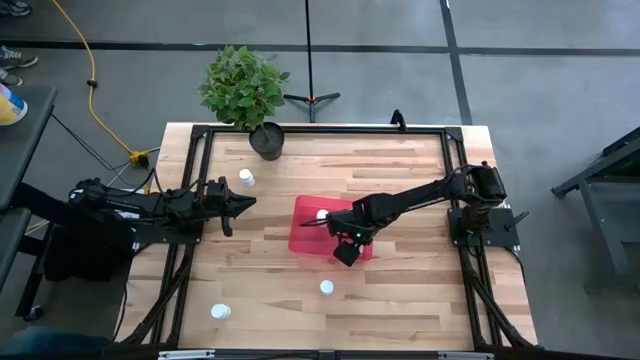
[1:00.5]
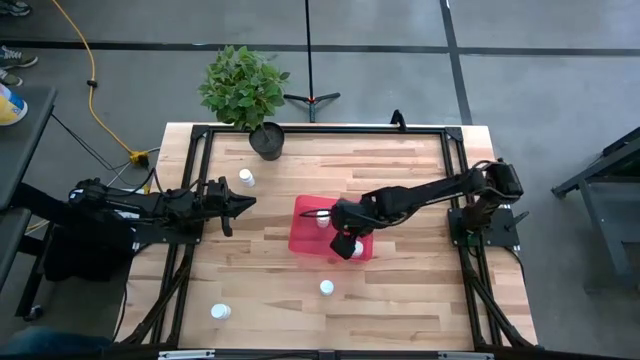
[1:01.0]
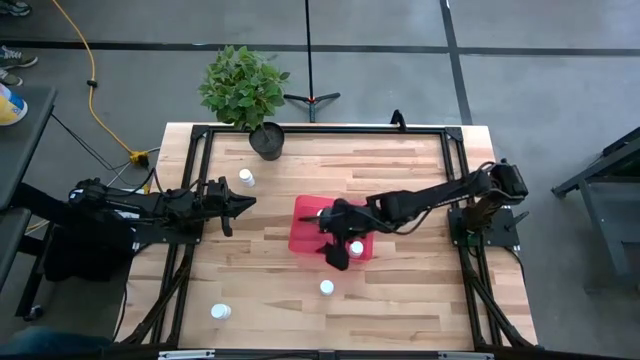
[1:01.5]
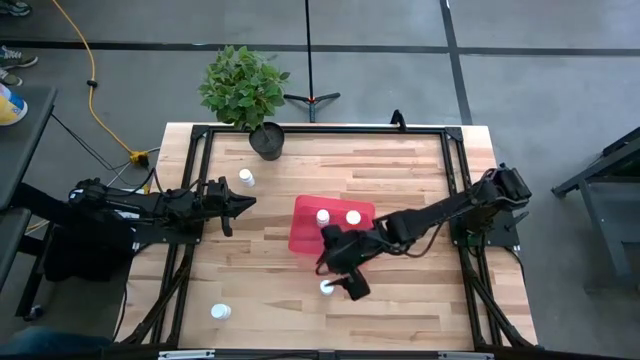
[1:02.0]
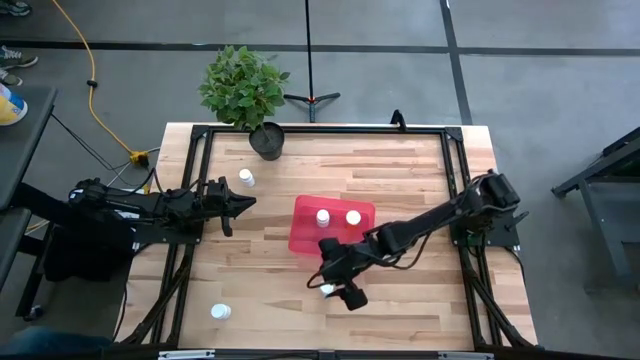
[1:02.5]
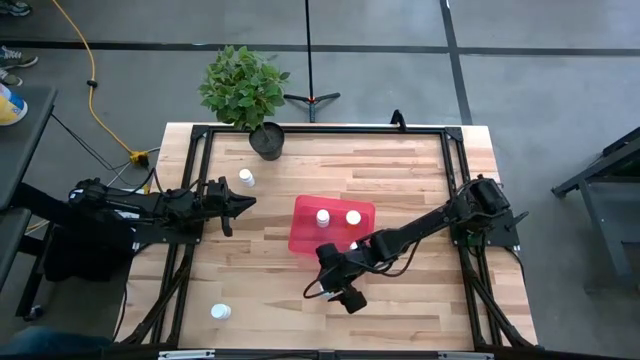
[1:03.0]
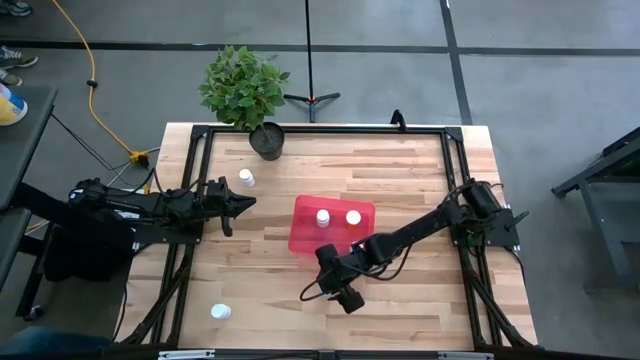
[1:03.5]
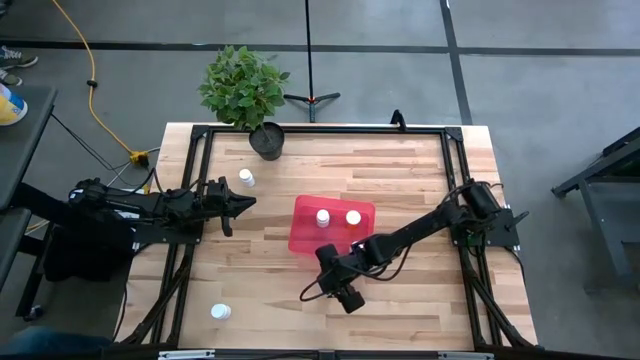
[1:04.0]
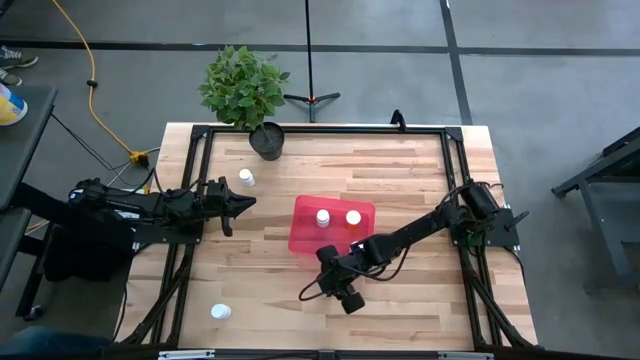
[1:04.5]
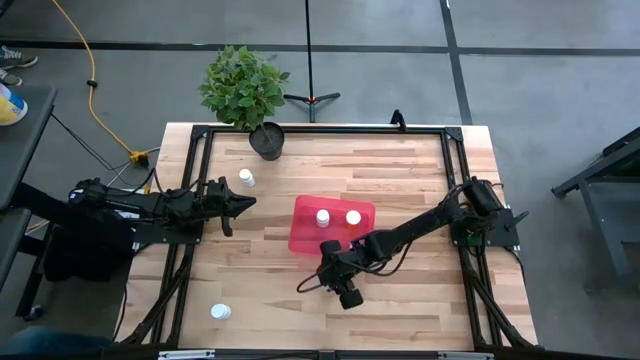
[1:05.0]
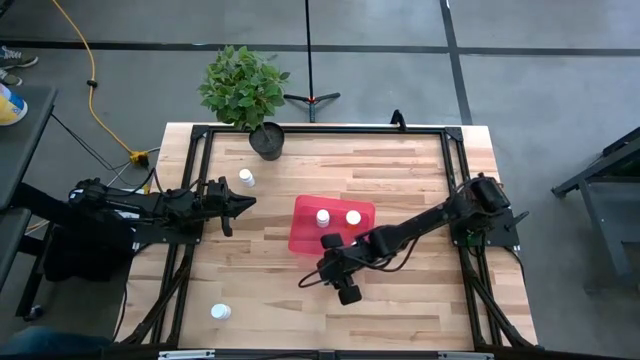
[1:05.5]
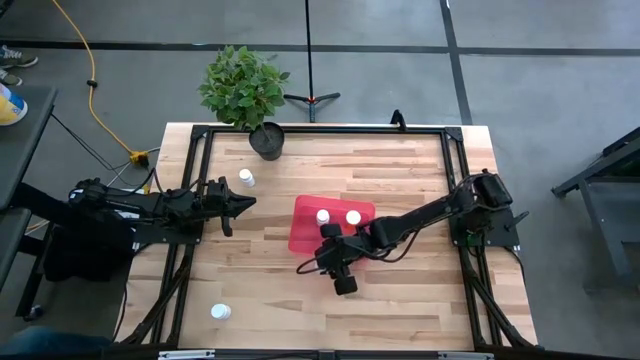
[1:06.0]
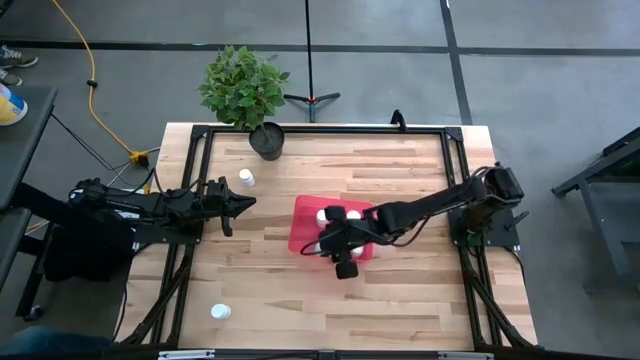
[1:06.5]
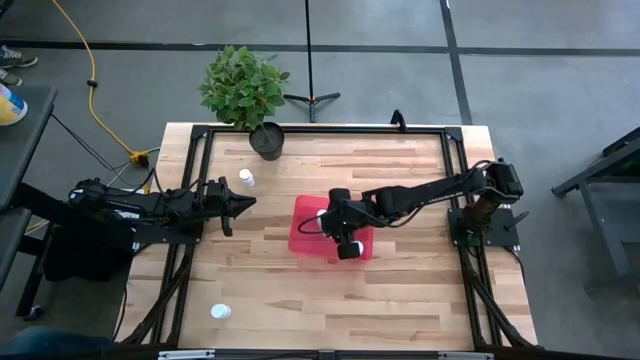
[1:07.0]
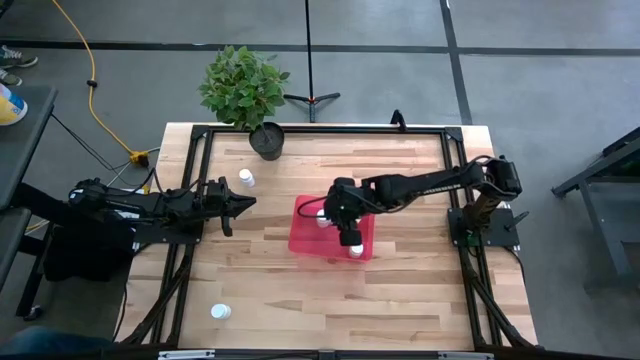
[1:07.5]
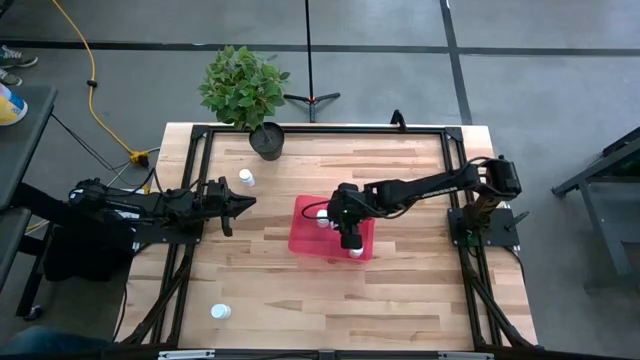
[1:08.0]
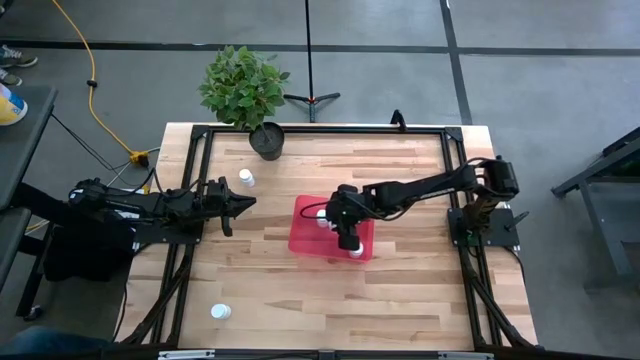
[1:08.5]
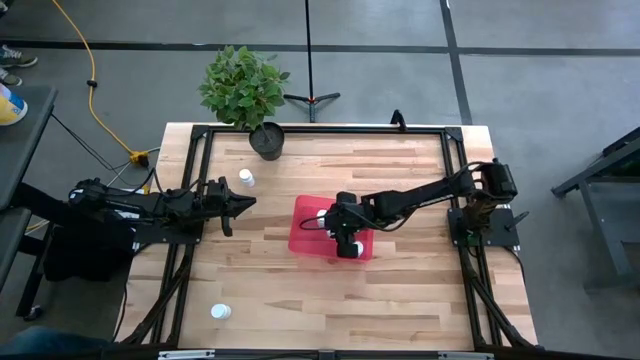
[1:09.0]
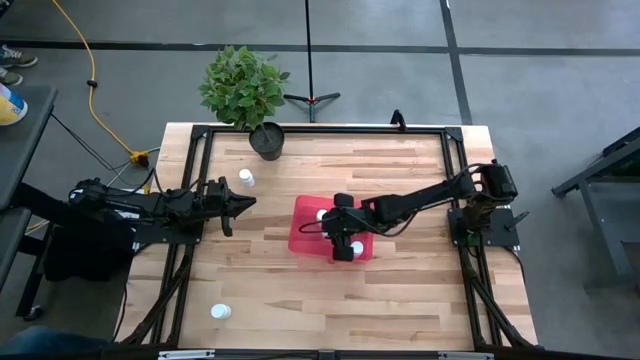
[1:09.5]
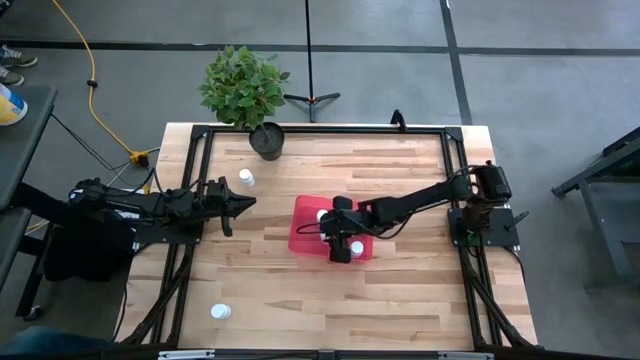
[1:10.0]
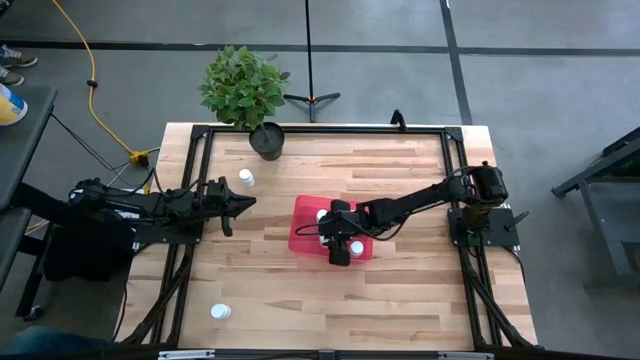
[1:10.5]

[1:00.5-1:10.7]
Task: Pick and place pill bottles into a basket
Put the right white medicine bottle into the bin

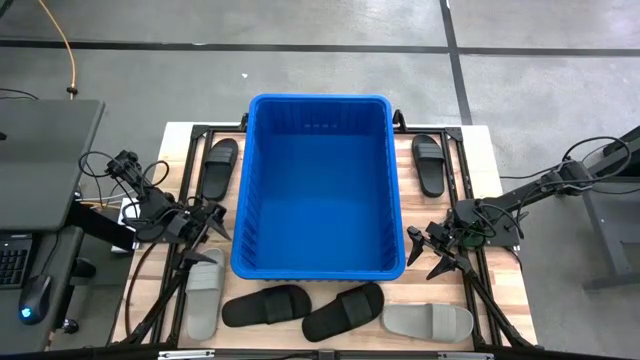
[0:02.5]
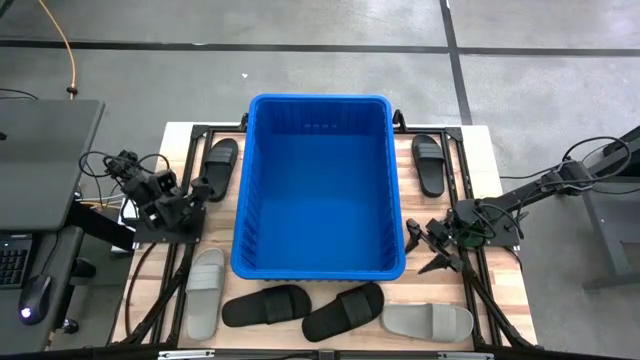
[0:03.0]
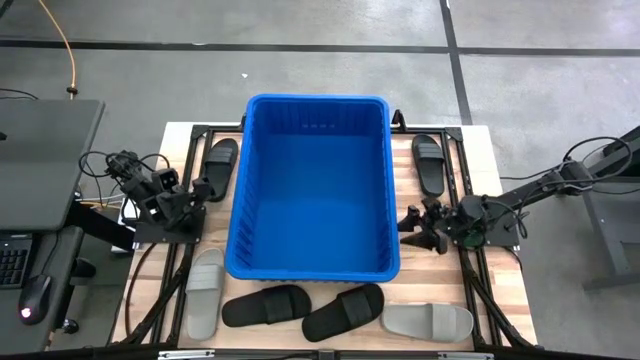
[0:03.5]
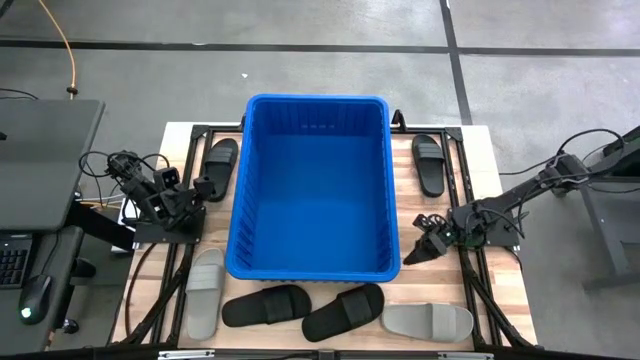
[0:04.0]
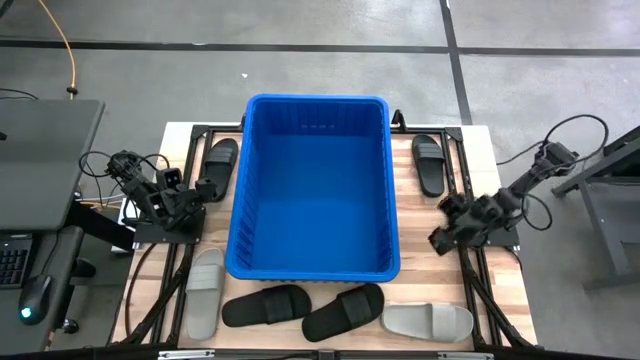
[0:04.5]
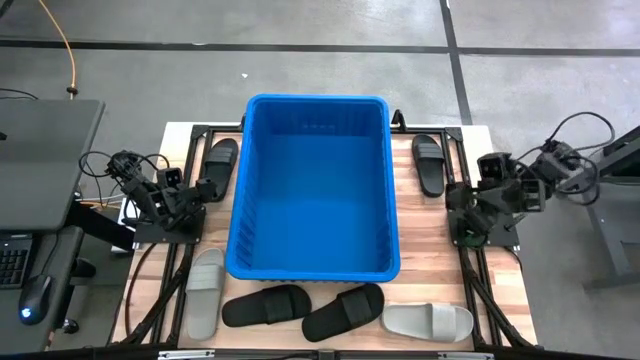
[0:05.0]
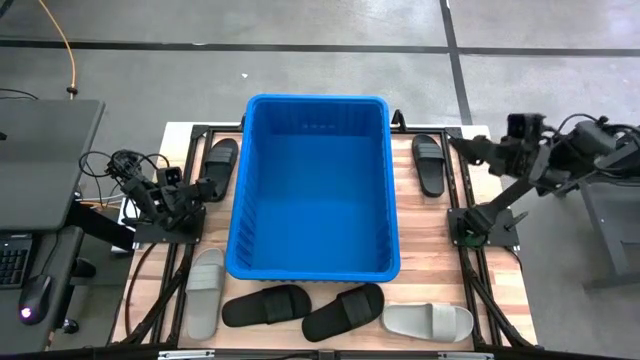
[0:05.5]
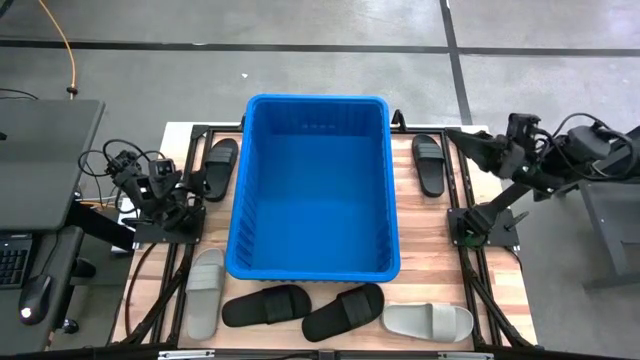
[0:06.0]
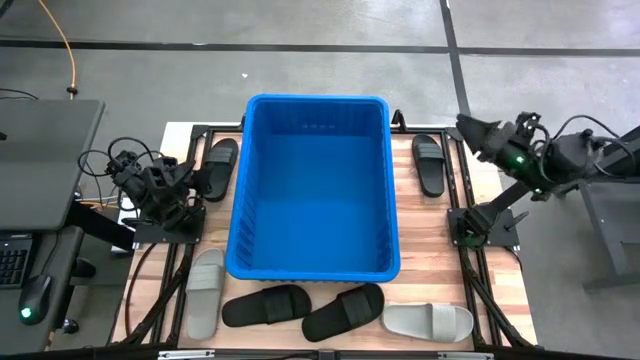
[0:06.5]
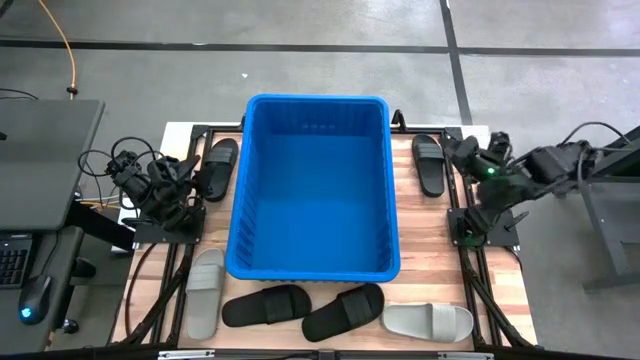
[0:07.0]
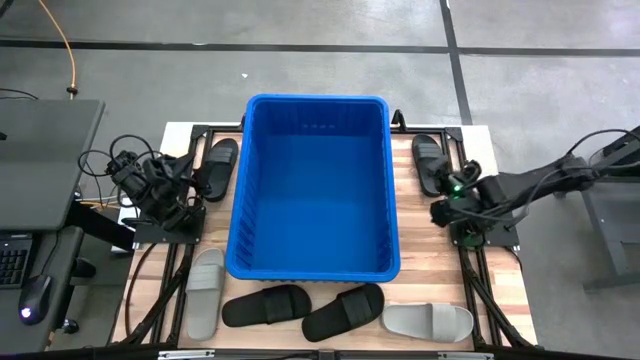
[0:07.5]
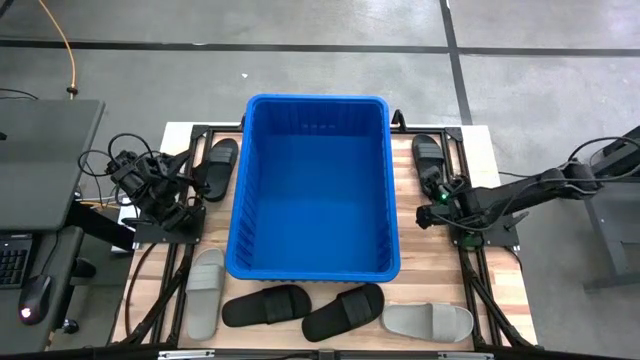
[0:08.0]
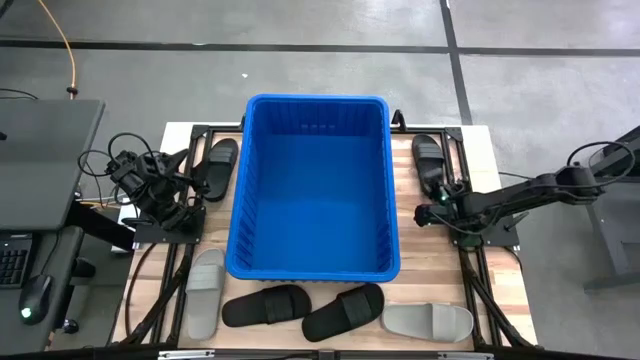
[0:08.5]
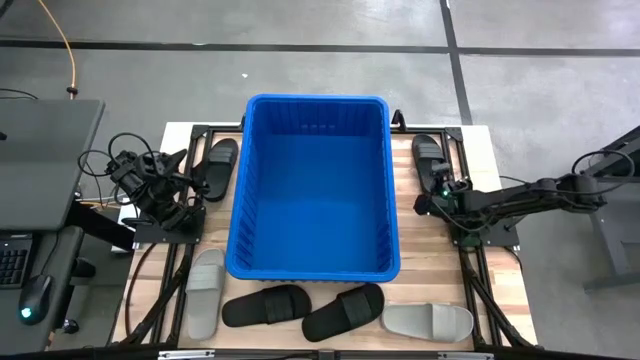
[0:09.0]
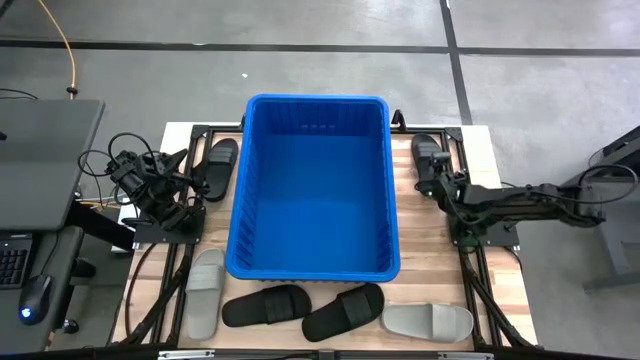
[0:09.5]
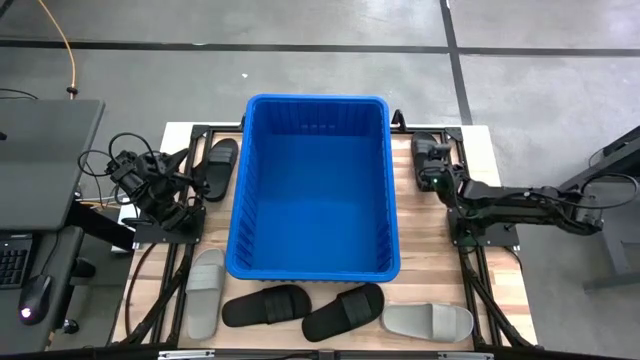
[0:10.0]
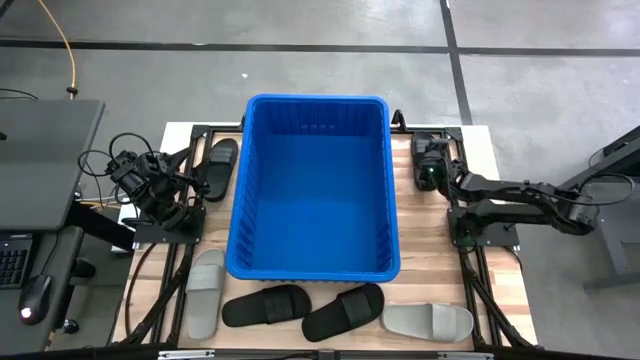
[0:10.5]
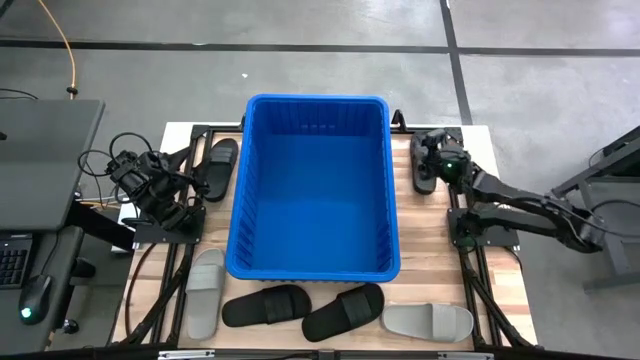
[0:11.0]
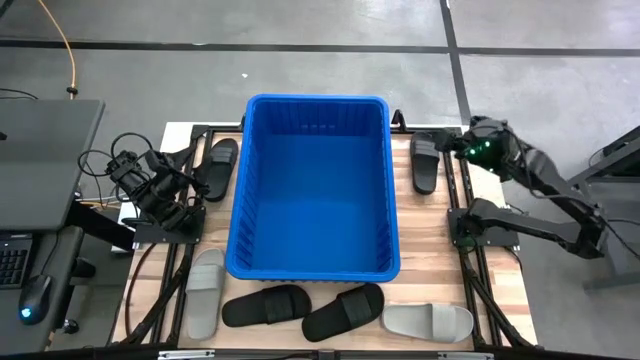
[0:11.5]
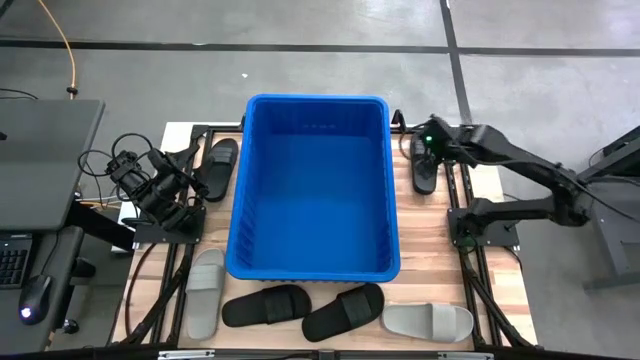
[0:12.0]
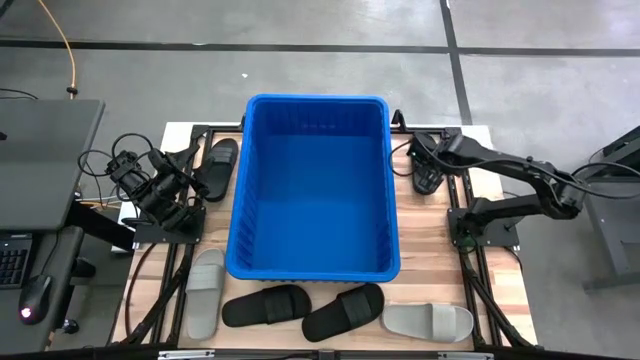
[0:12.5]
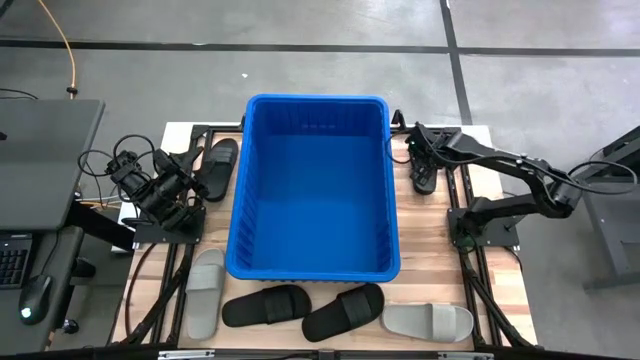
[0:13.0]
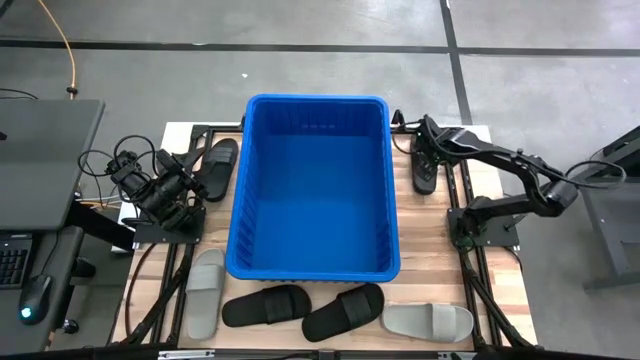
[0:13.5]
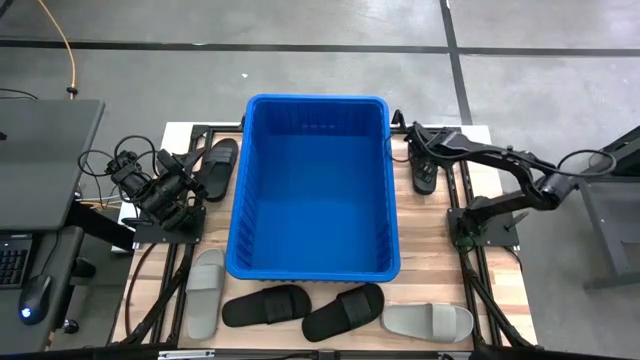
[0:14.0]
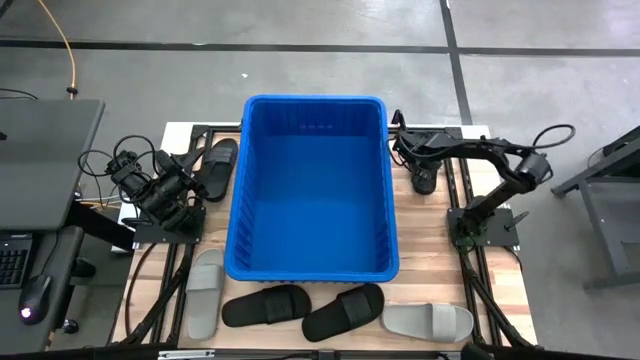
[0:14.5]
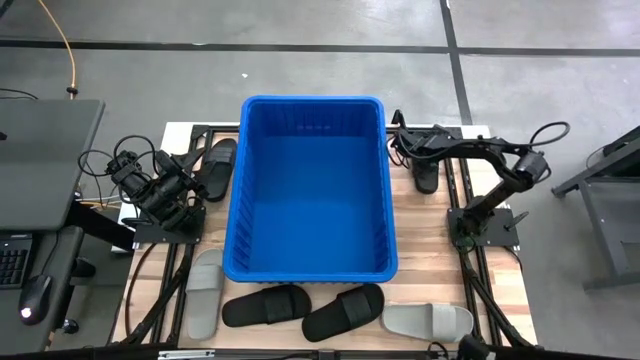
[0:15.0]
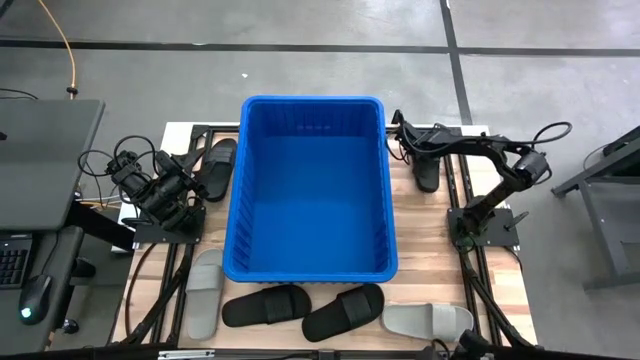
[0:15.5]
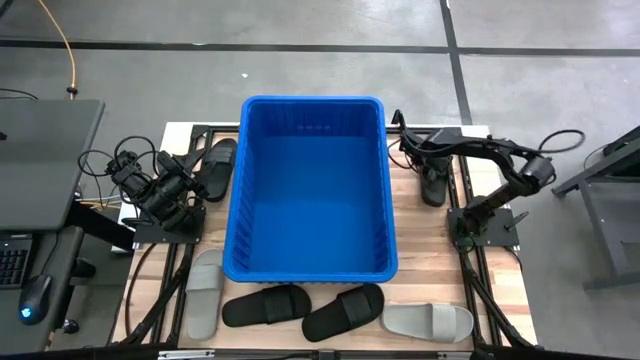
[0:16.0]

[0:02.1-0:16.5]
Task: Pick and place slides into bin
Put the top right black slide into the blue container
